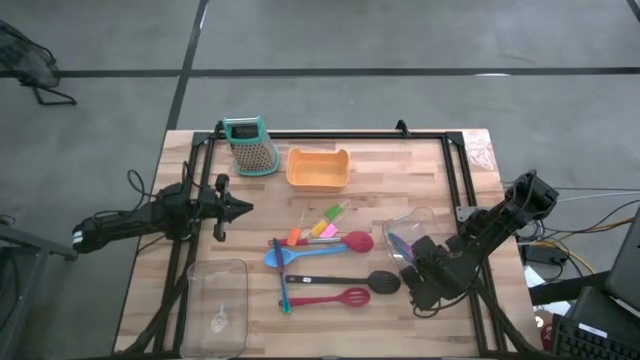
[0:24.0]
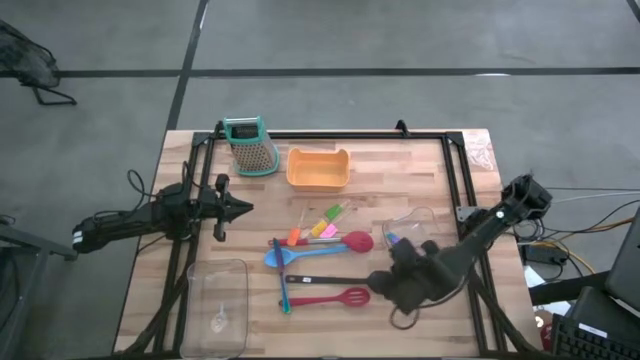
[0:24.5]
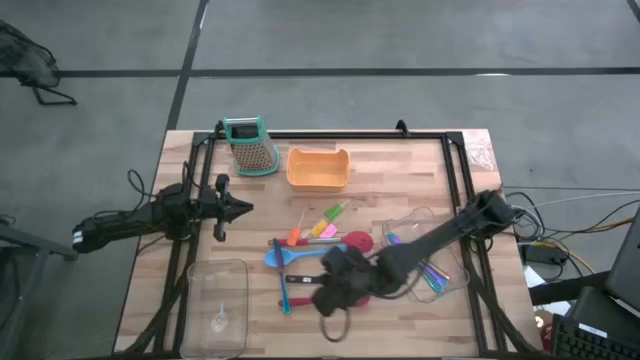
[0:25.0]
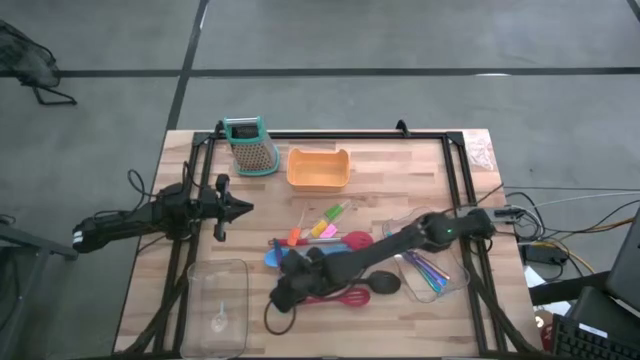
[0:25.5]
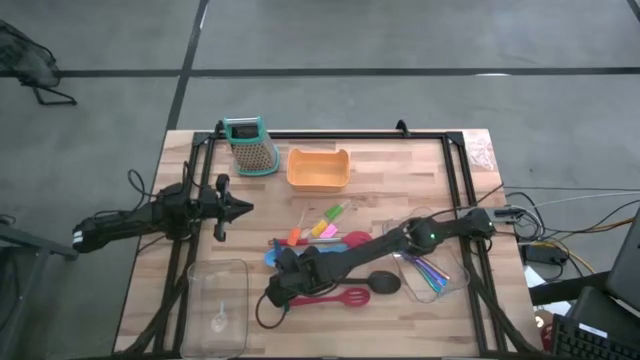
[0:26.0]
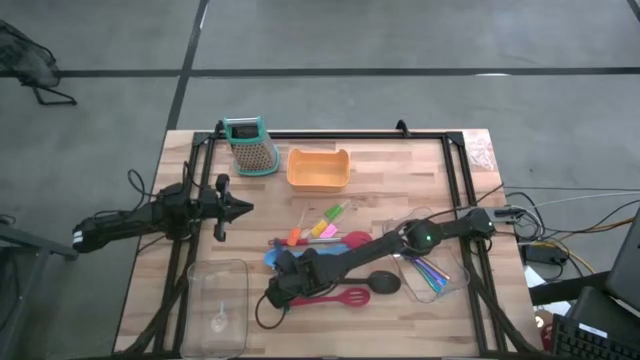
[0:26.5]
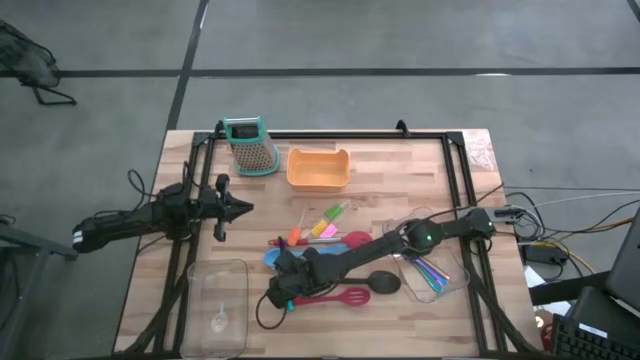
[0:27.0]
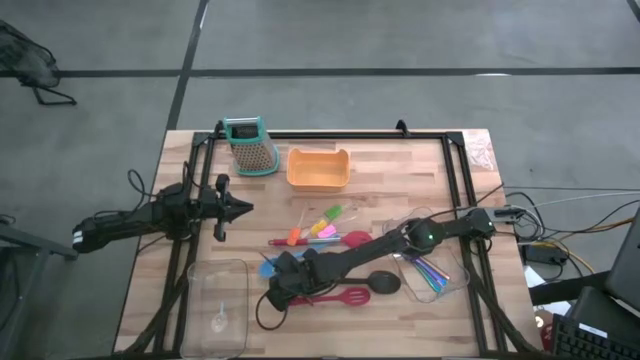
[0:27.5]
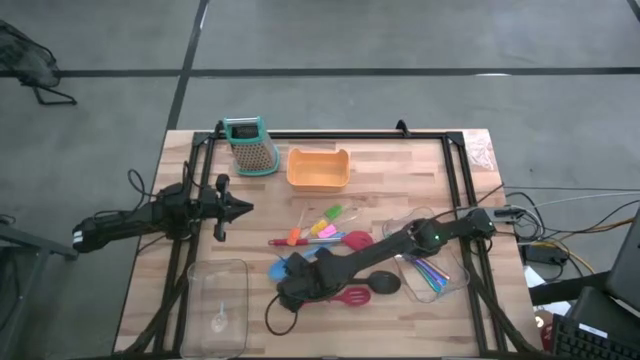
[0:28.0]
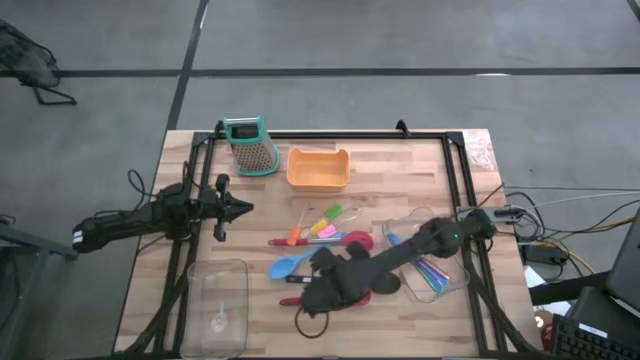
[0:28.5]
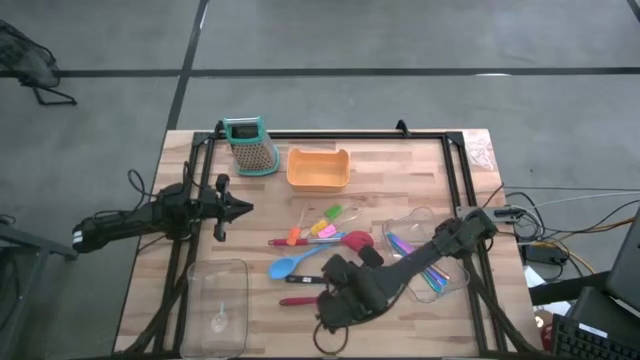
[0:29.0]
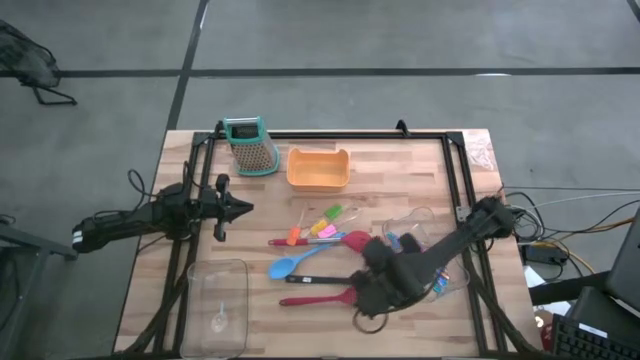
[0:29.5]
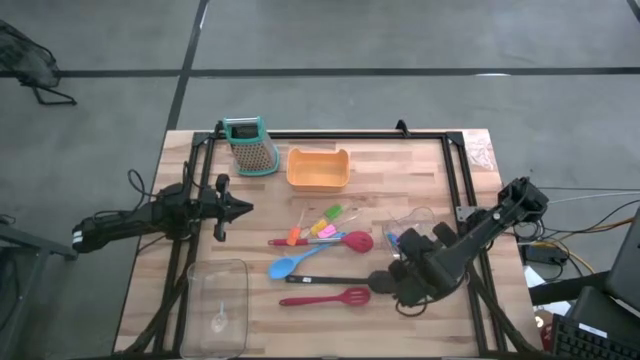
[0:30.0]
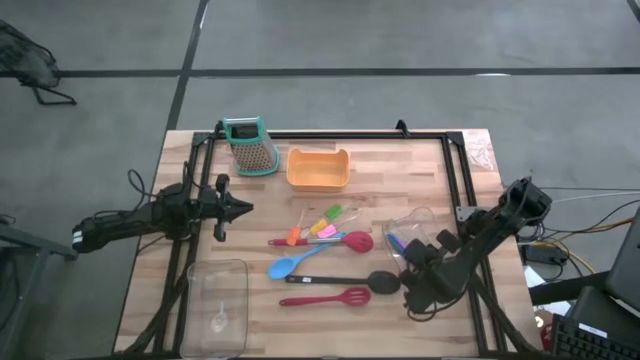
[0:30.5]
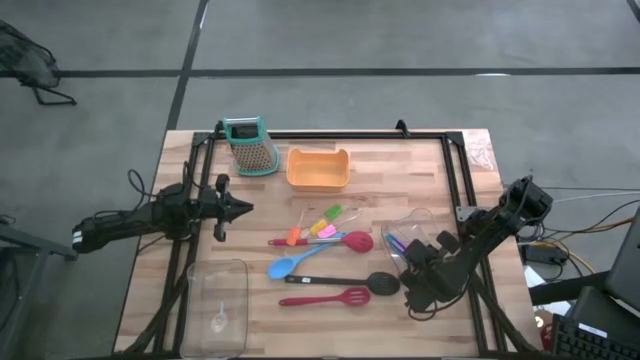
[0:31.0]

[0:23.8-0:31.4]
Task: Pick & Place Kitchen Items
Put the blue knife into the top transparent bin

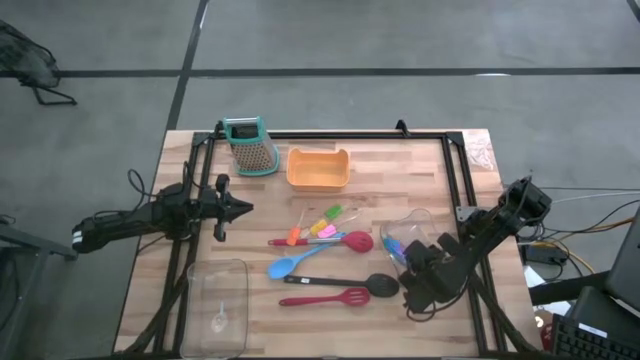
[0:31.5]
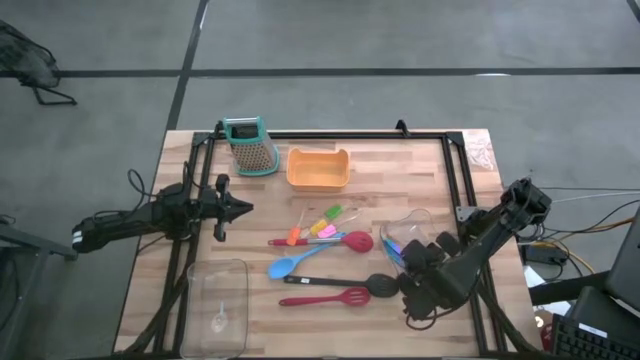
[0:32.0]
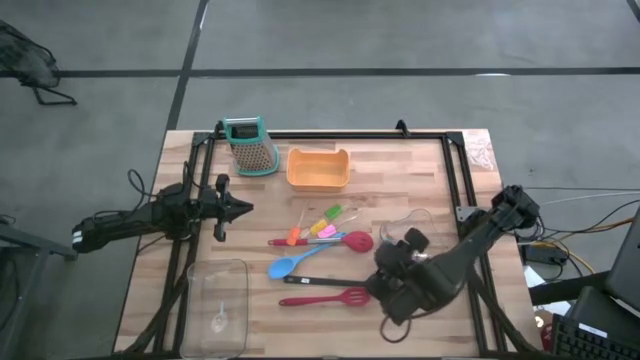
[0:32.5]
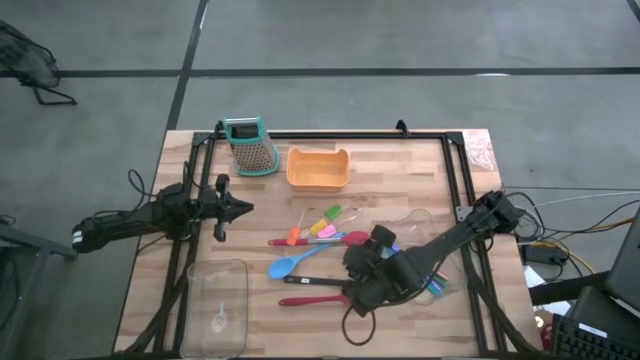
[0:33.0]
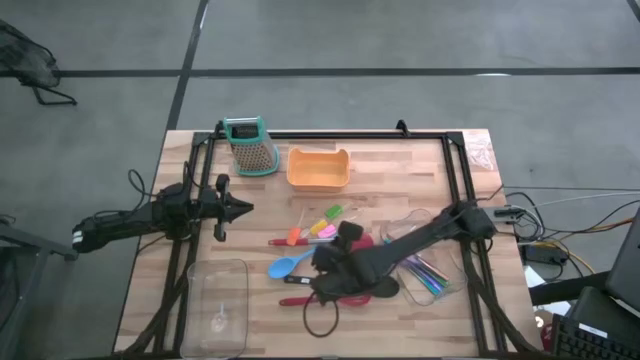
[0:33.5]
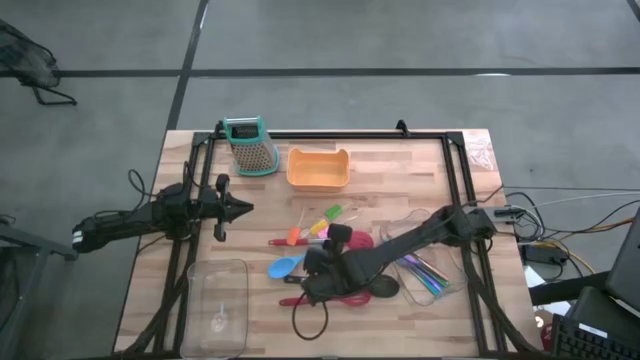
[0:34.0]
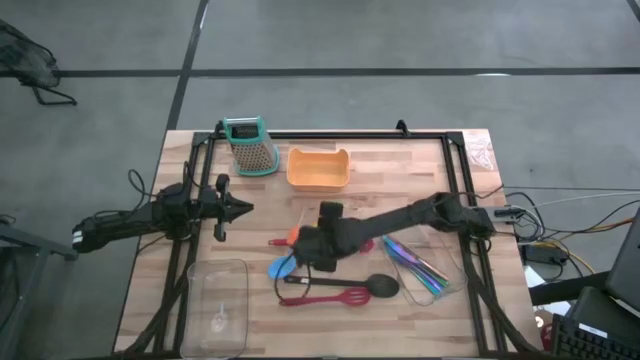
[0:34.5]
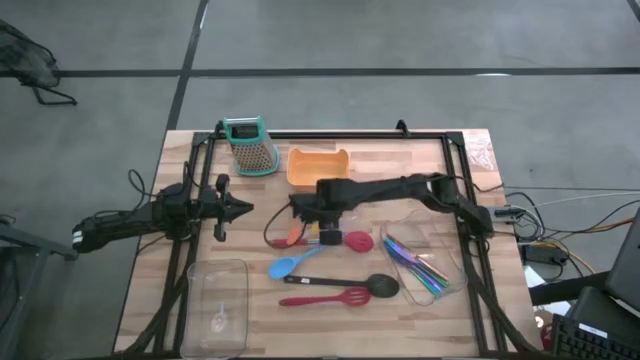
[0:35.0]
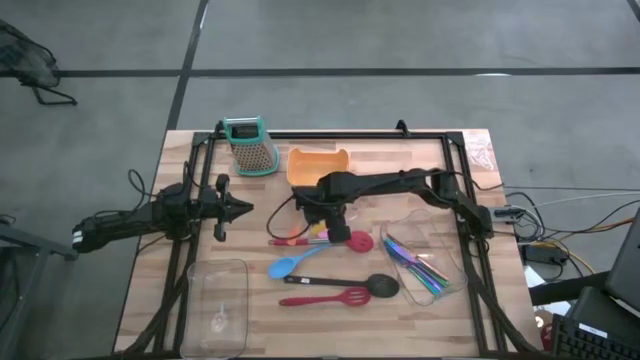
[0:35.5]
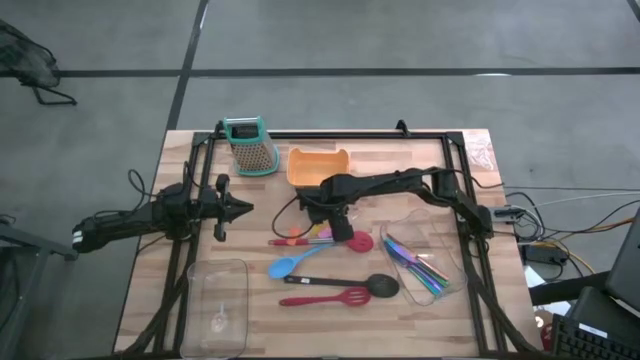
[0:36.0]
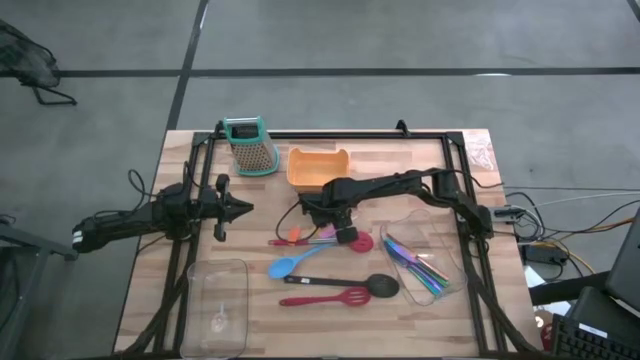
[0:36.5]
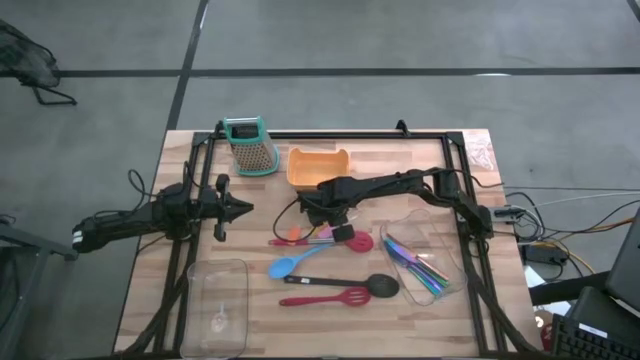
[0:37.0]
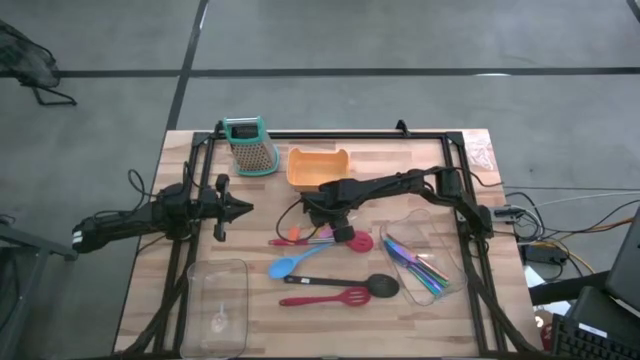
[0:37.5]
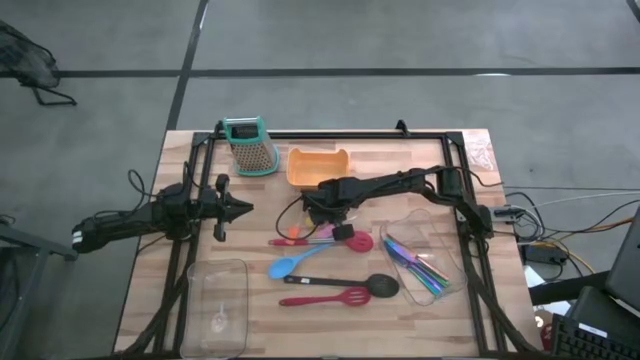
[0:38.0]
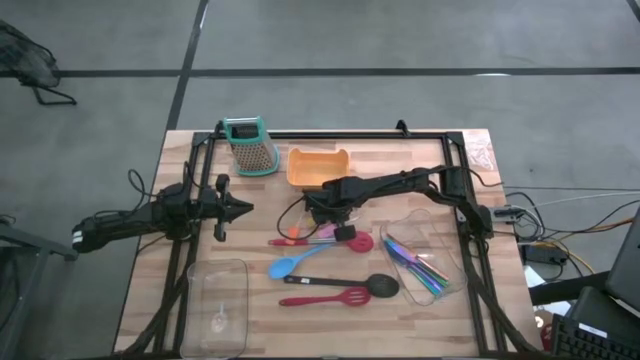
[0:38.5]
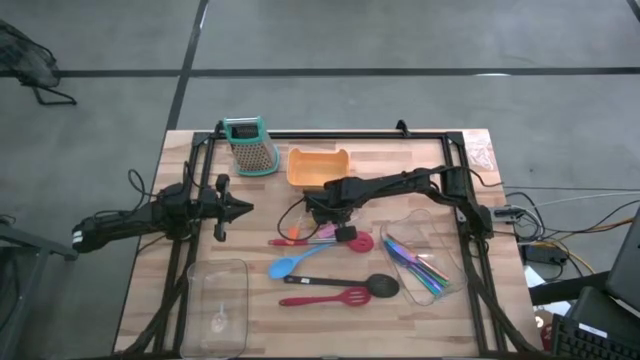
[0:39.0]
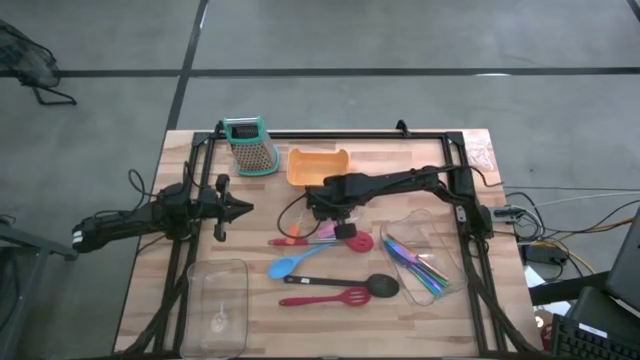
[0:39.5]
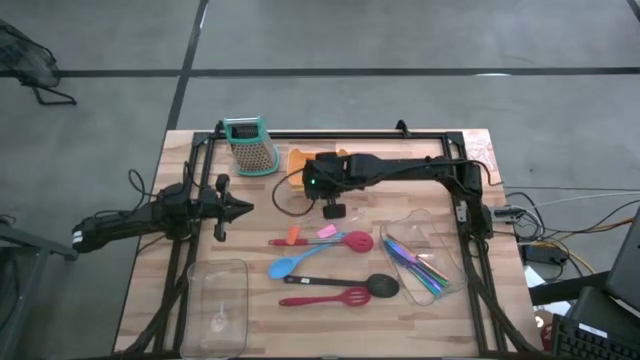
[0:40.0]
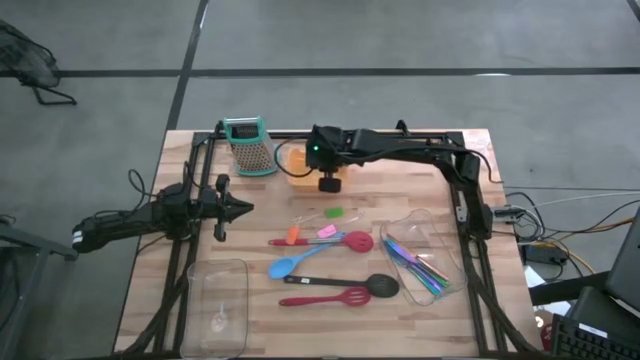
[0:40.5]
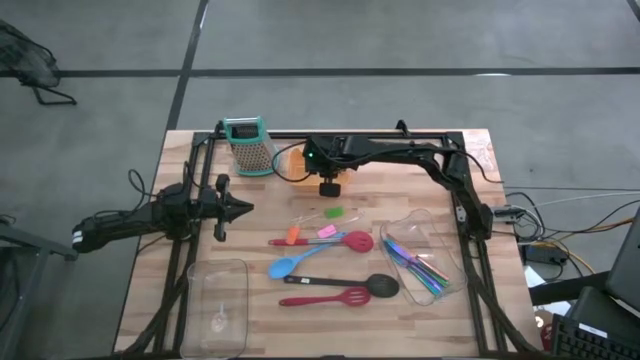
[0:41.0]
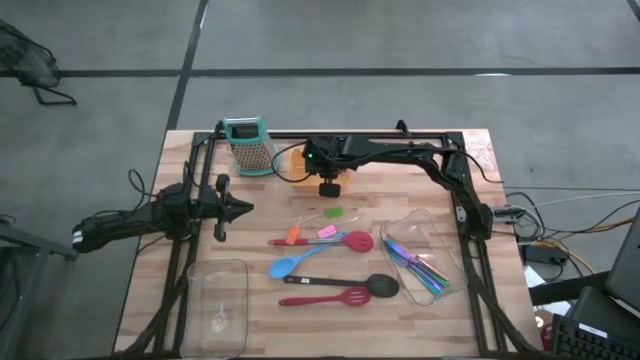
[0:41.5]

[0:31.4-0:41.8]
Put the yellow spatula into the yellow bin

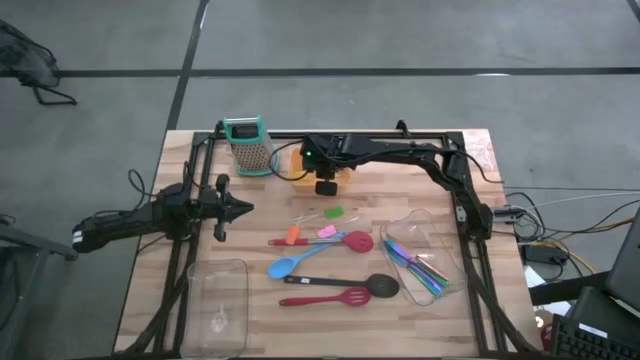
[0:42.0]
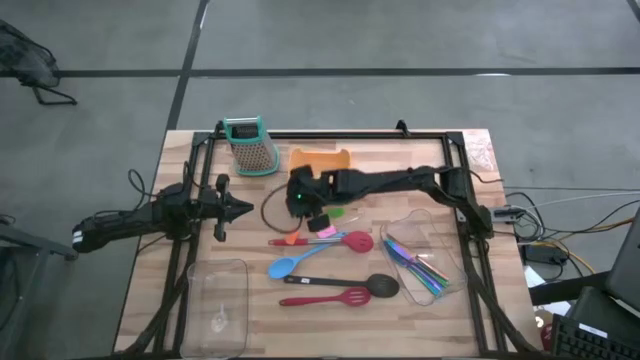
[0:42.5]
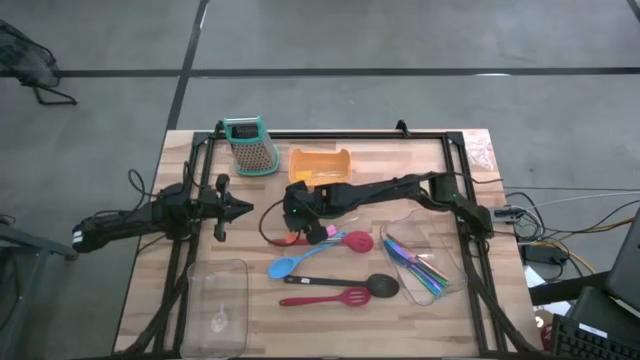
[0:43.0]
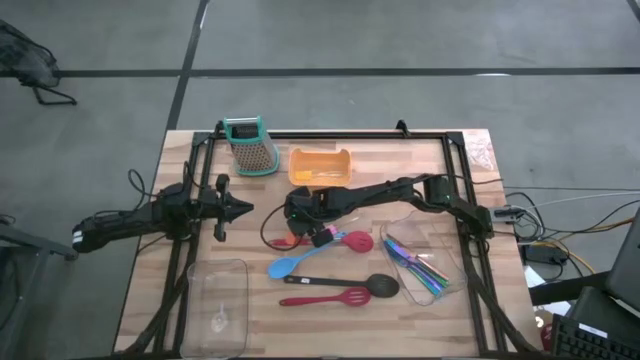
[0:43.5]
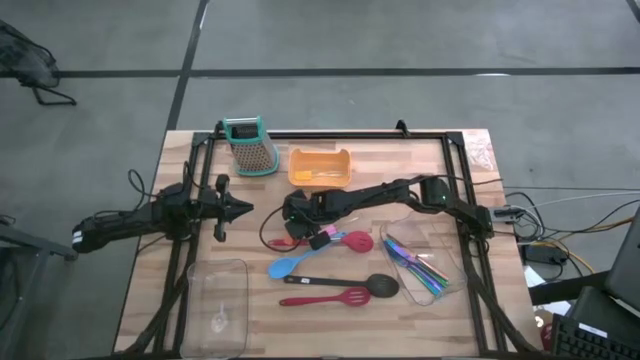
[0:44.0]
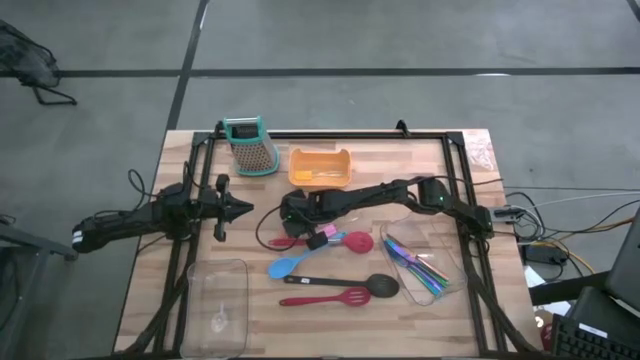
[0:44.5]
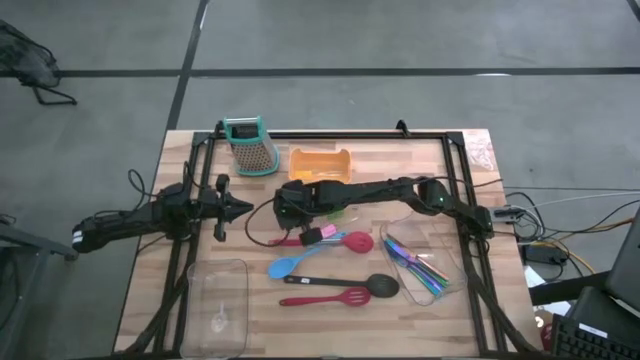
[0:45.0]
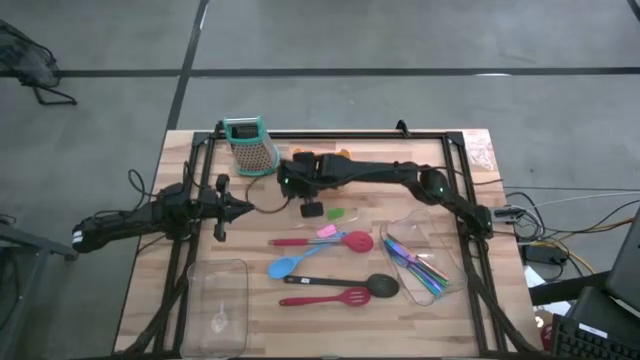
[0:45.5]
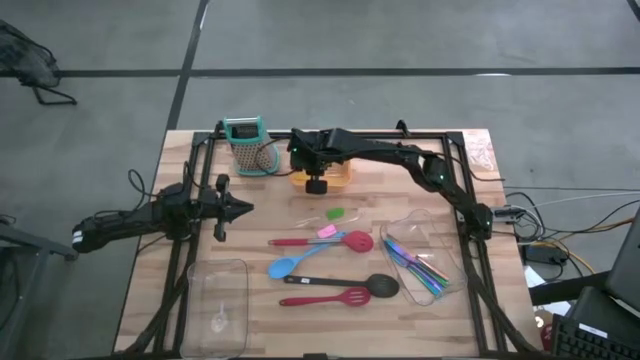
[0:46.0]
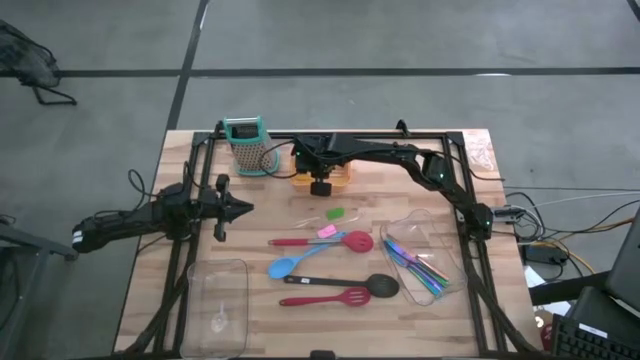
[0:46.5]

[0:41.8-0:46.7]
Put the orange spatula into the yellow bin
